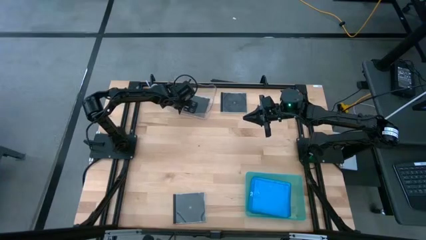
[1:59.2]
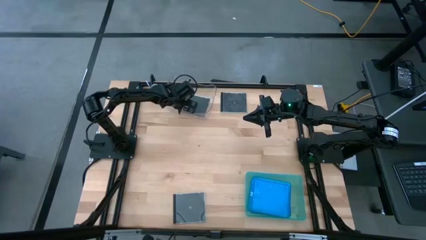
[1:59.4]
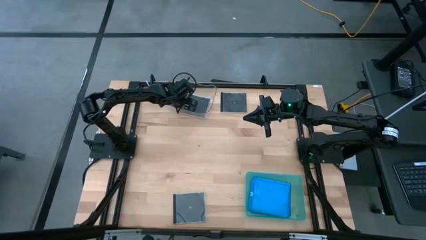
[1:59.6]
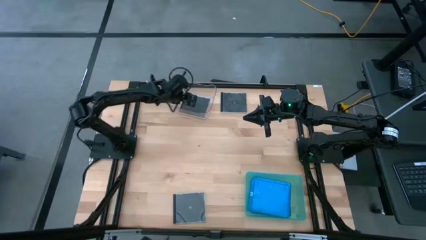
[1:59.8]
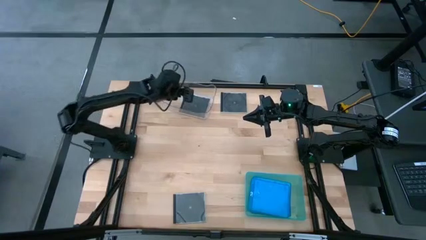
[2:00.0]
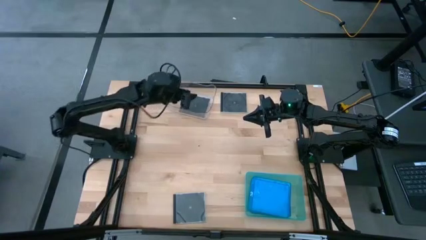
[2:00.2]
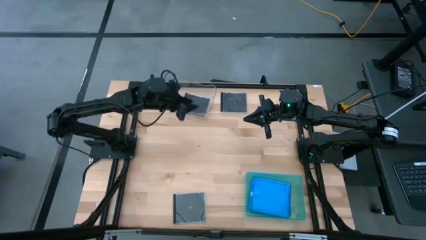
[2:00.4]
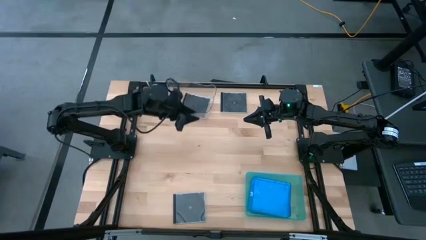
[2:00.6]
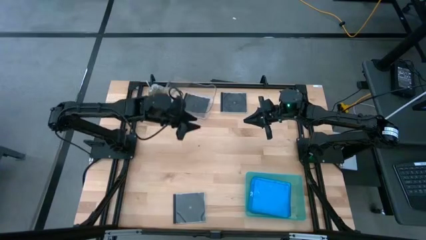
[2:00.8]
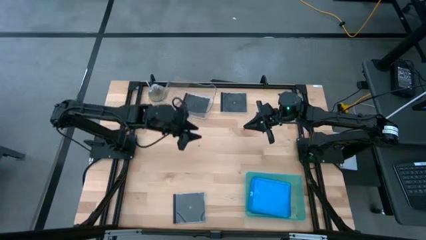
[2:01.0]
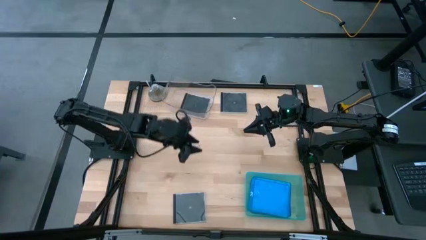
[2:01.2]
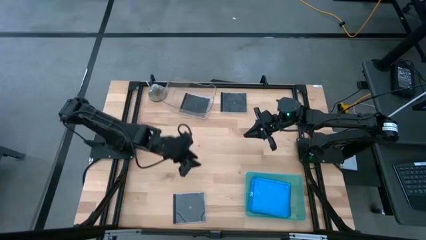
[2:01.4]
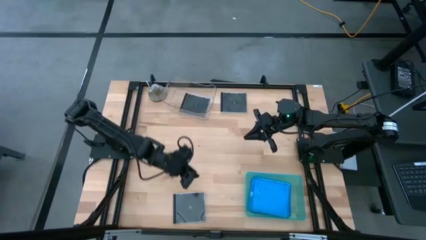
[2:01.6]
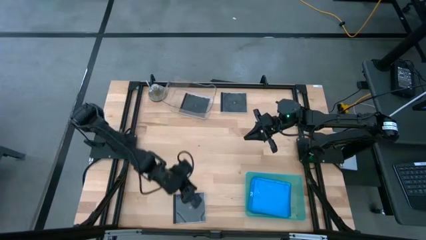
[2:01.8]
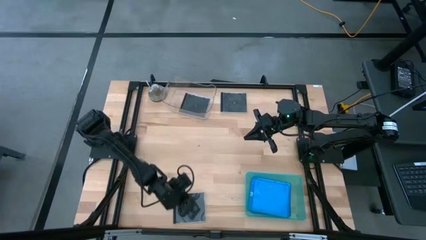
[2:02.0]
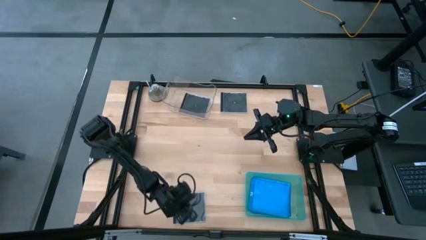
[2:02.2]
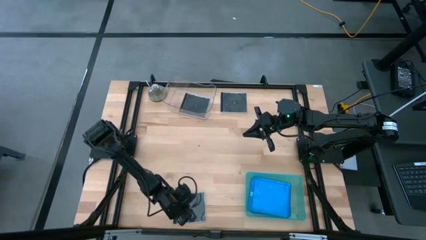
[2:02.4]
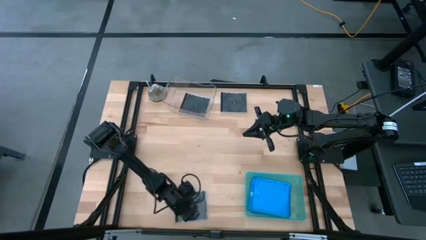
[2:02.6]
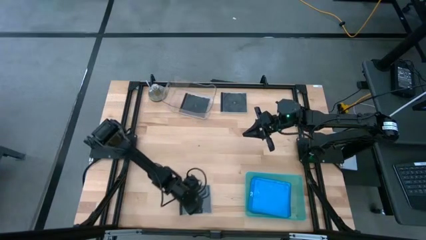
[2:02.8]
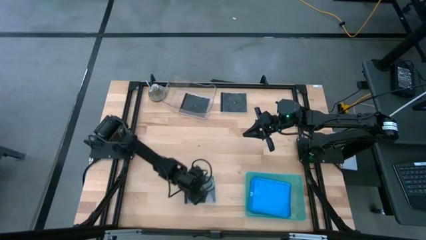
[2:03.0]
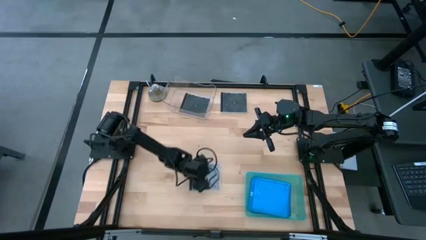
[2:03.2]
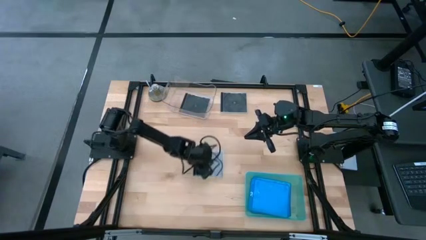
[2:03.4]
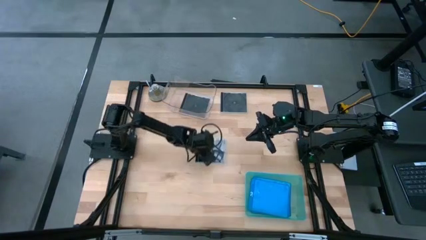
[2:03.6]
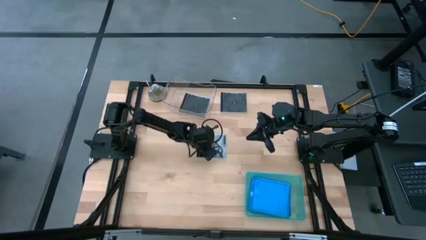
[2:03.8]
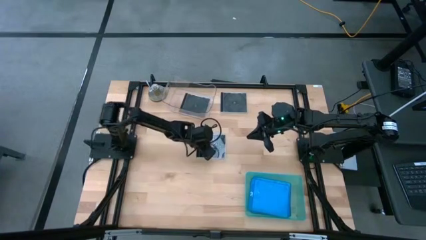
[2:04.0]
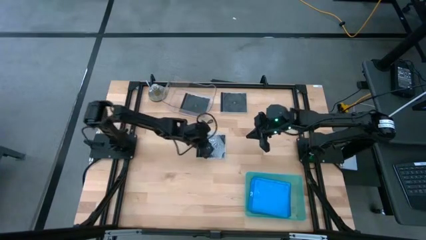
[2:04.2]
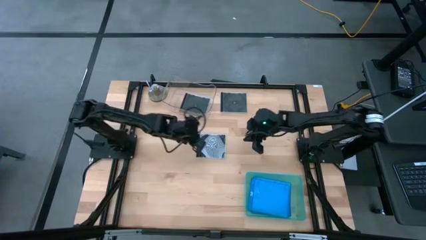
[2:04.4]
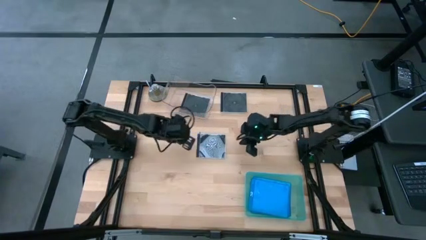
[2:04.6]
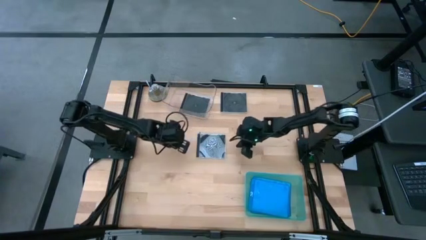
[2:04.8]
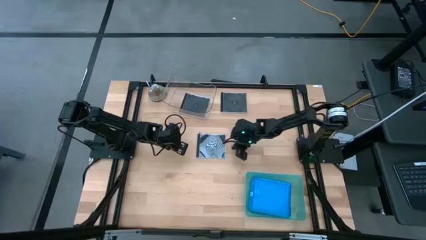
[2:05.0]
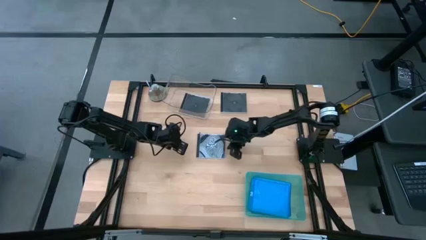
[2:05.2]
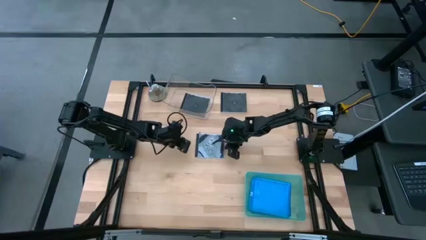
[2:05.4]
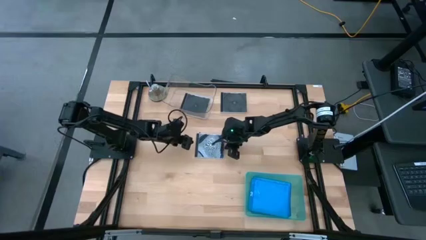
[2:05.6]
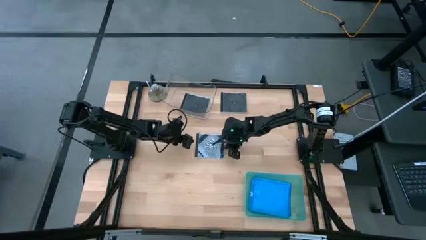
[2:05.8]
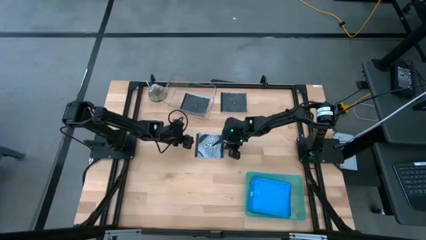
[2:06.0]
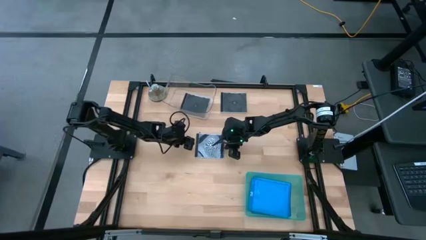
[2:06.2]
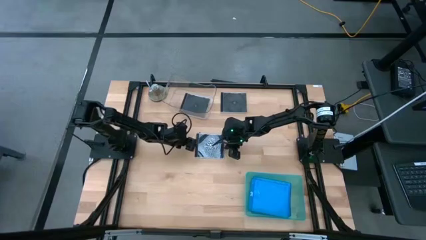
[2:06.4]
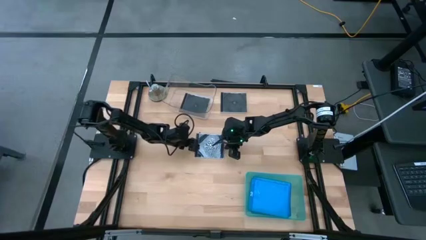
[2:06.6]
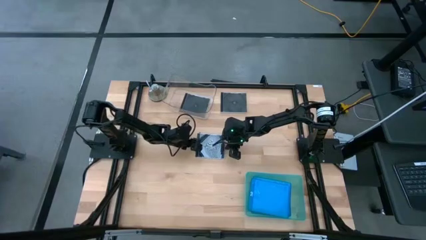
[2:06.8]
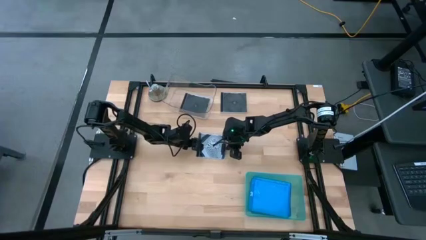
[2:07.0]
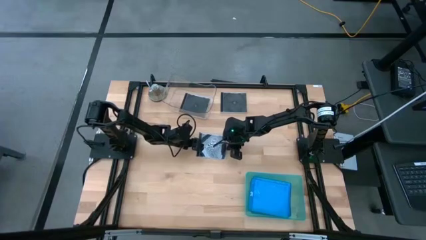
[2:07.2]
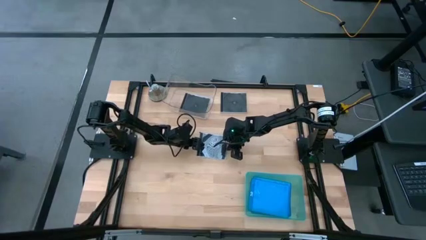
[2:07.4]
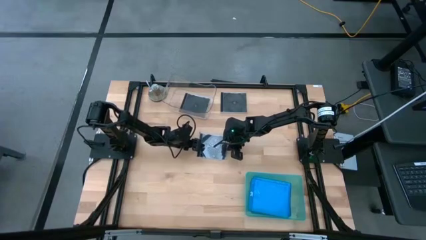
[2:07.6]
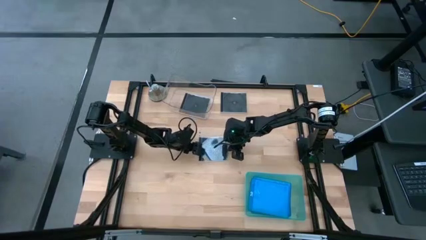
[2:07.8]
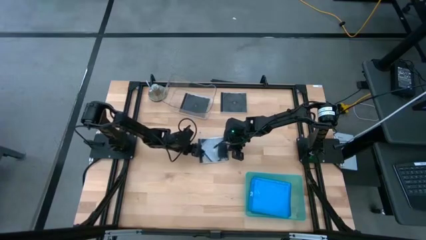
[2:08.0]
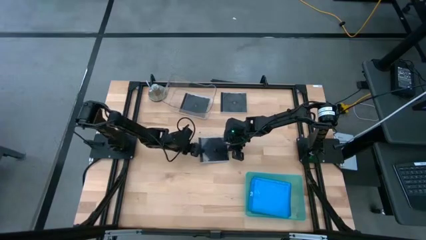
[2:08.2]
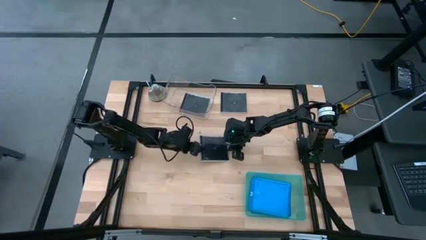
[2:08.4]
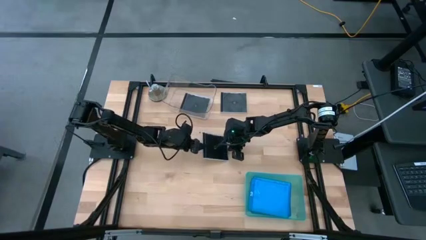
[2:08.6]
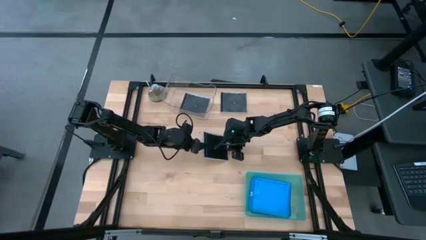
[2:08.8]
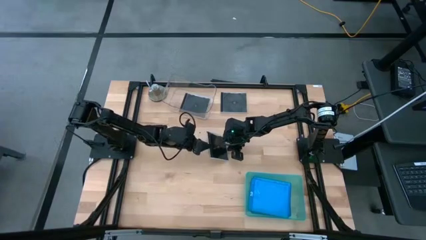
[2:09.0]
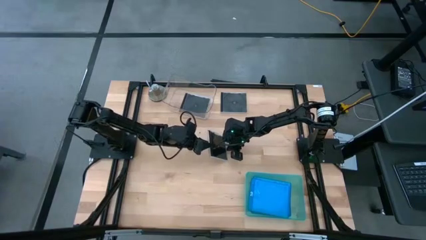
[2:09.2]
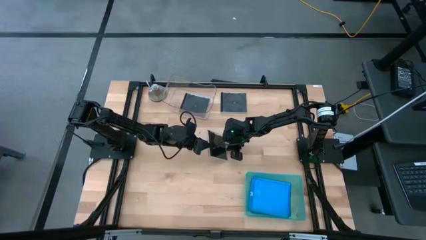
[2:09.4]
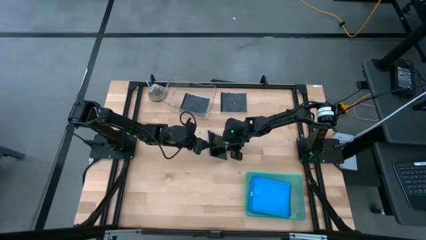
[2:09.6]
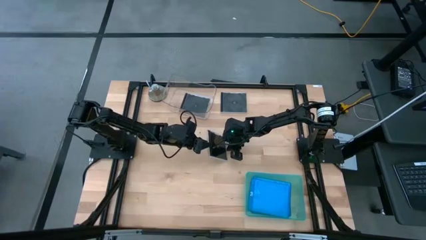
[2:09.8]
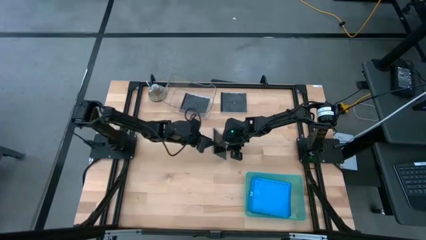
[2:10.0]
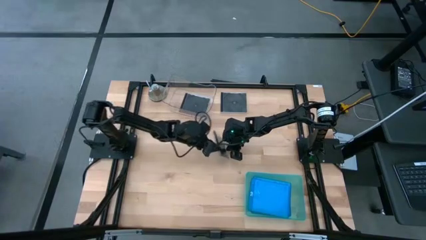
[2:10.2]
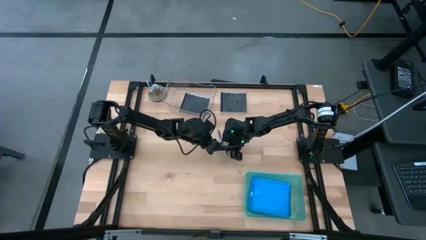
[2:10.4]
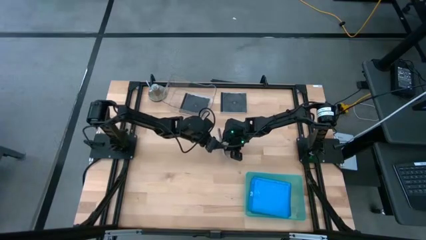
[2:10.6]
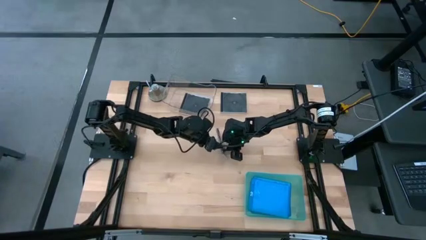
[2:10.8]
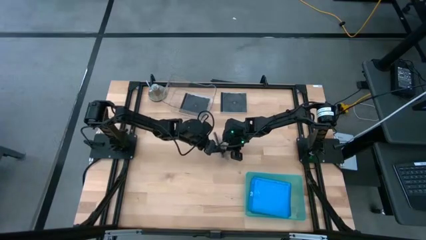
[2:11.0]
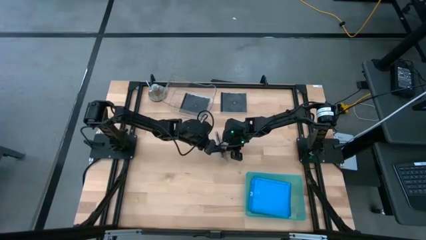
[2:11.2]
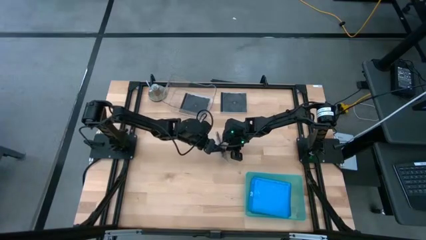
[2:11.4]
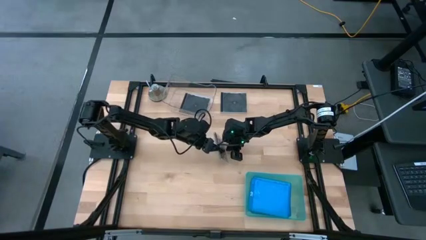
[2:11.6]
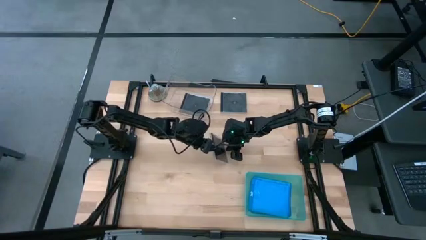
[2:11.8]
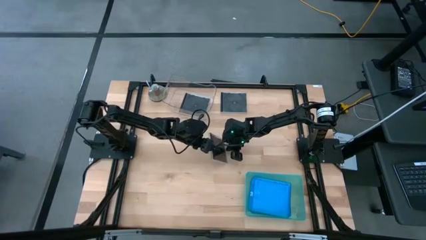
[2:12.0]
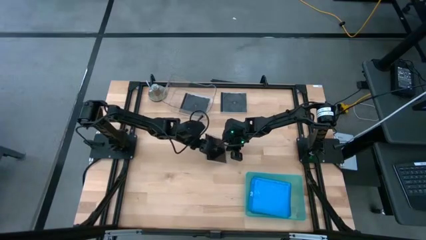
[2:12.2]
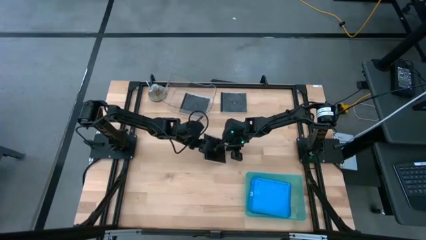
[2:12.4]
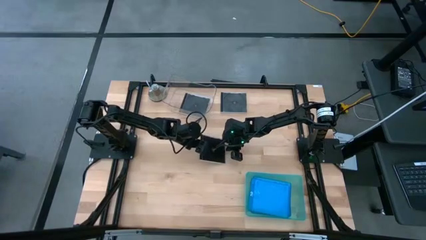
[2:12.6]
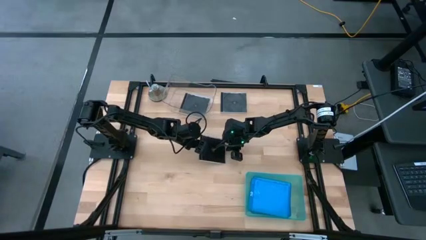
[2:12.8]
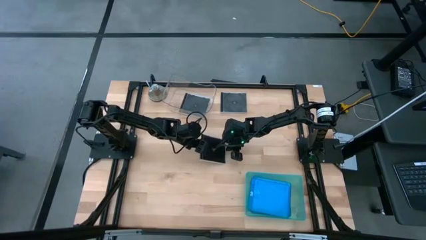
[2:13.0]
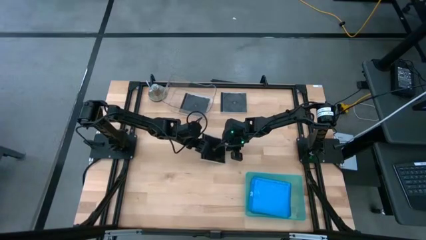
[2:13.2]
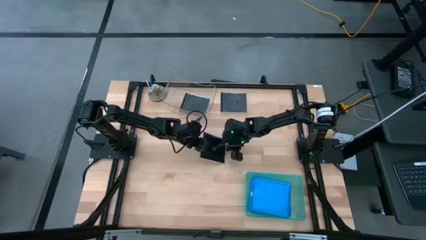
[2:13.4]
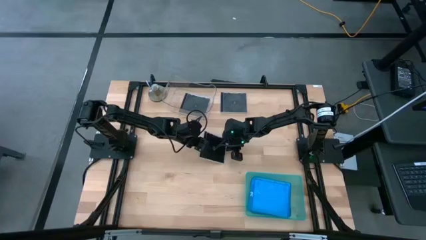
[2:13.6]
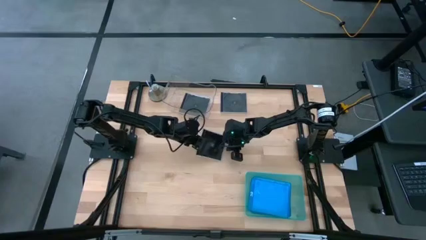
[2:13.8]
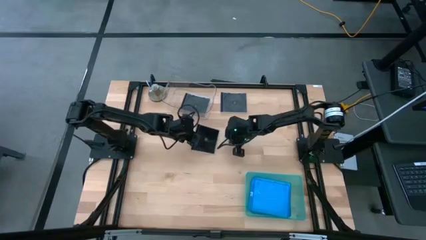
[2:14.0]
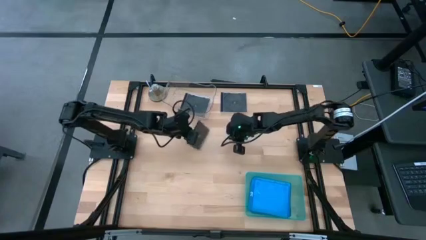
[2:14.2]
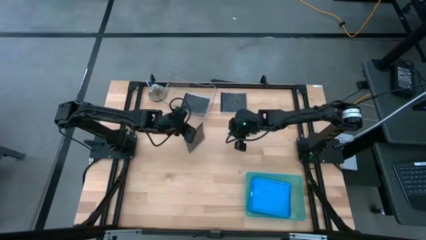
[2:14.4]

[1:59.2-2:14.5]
Task: Pick & place jewel cases by type
Put the bottom black cd case into the transparent bin

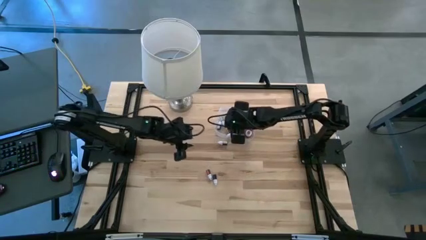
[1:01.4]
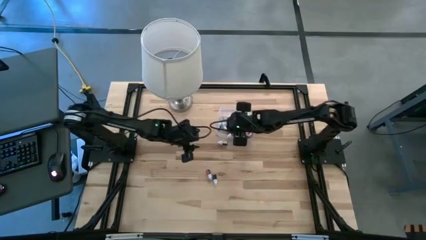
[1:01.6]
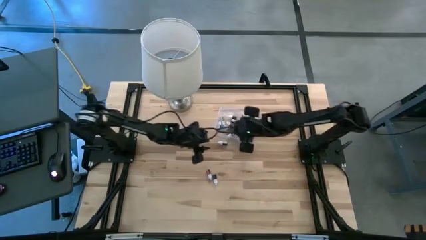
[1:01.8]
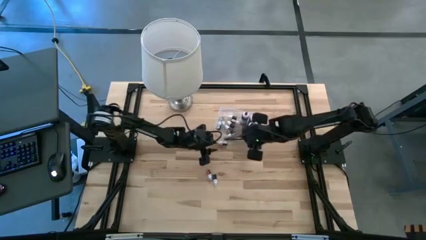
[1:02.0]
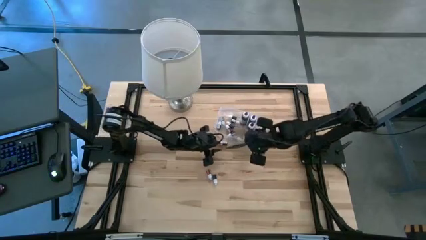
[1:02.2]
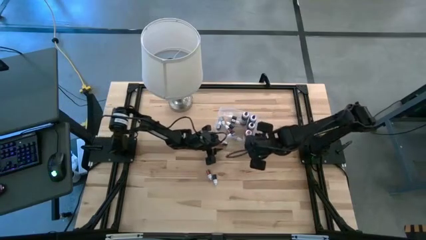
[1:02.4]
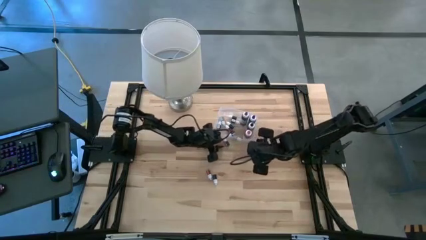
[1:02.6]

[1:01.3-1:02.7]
Task: Pick & Place food coloring
Put the small blue food coloring bottle into the transparent bin
